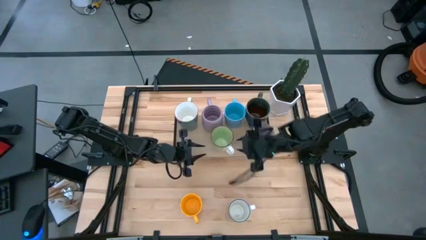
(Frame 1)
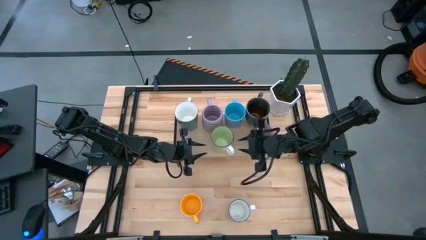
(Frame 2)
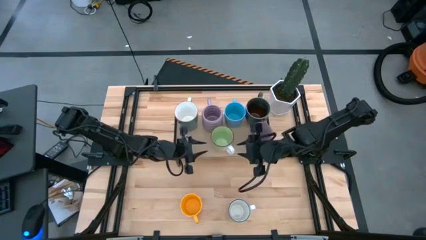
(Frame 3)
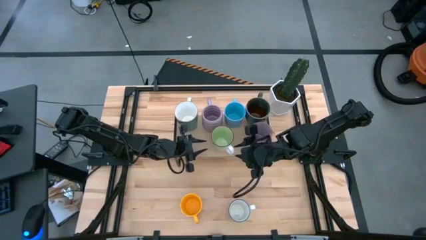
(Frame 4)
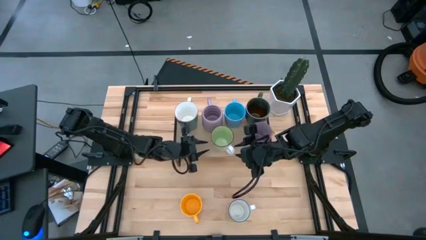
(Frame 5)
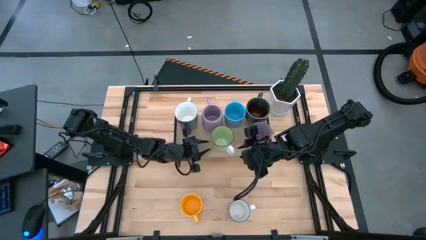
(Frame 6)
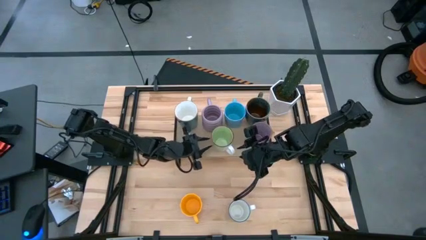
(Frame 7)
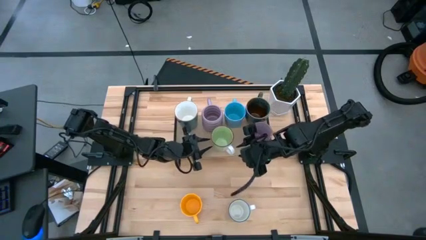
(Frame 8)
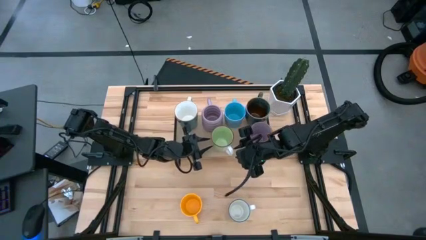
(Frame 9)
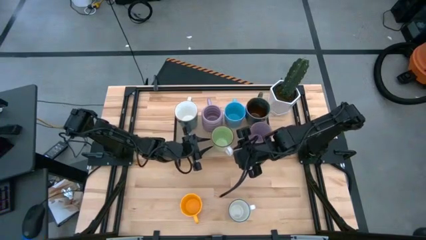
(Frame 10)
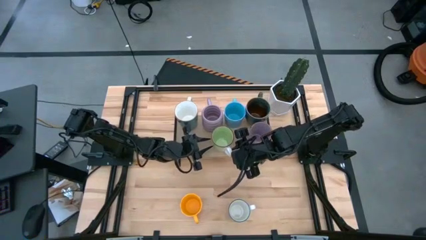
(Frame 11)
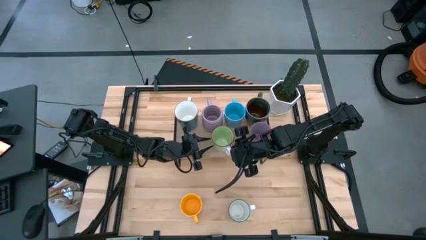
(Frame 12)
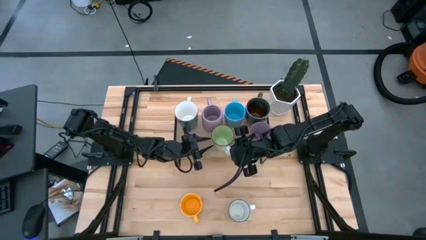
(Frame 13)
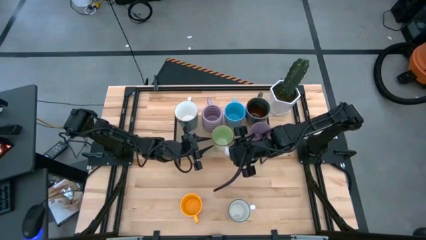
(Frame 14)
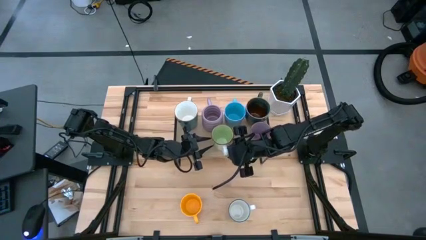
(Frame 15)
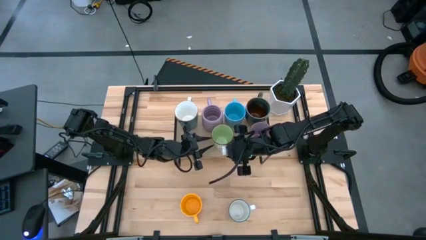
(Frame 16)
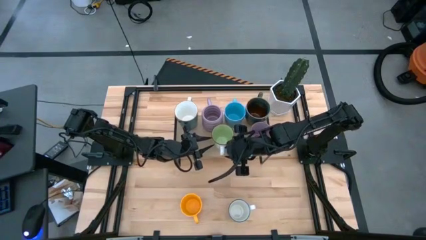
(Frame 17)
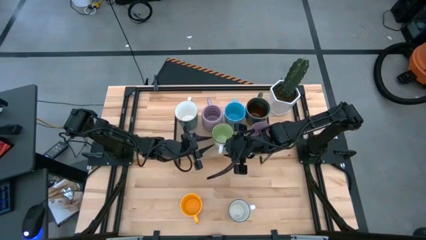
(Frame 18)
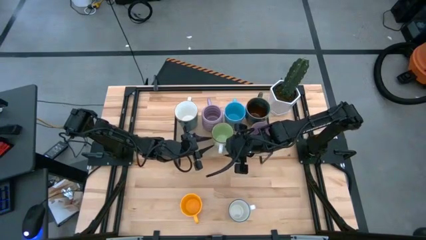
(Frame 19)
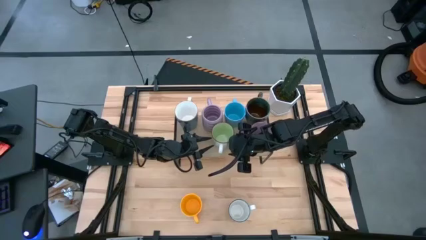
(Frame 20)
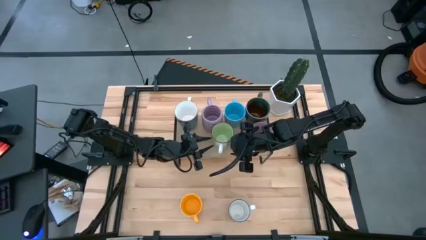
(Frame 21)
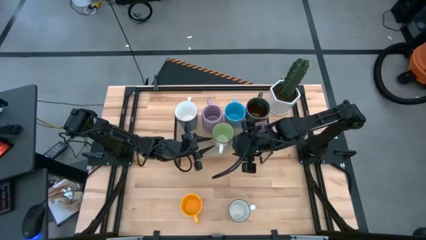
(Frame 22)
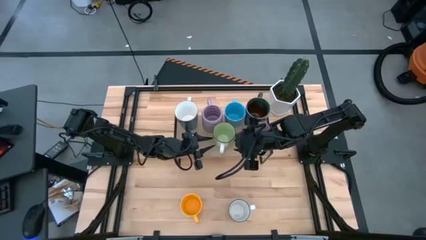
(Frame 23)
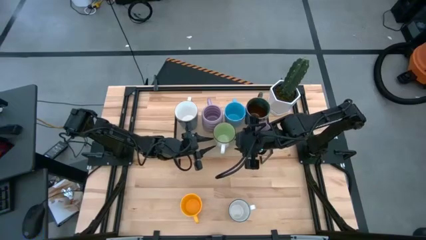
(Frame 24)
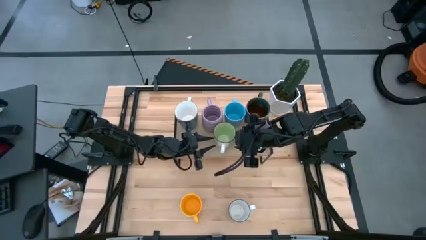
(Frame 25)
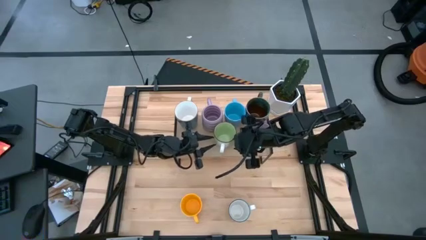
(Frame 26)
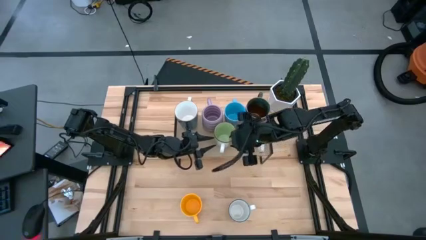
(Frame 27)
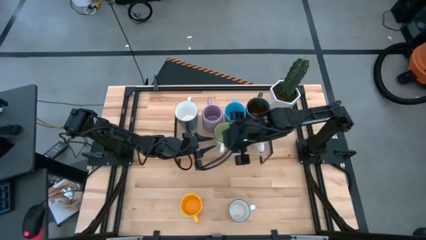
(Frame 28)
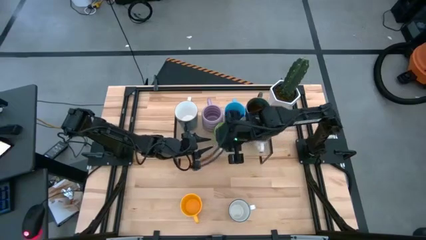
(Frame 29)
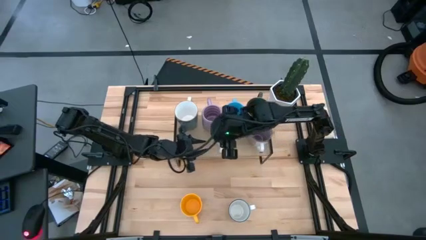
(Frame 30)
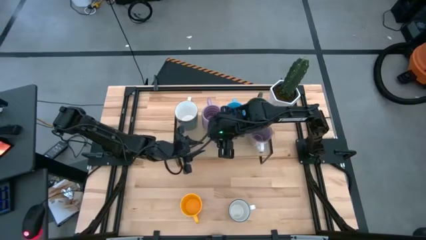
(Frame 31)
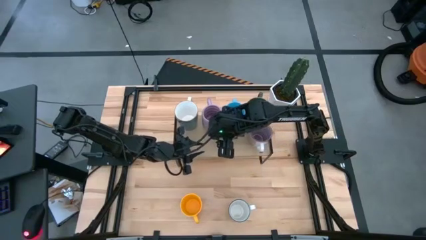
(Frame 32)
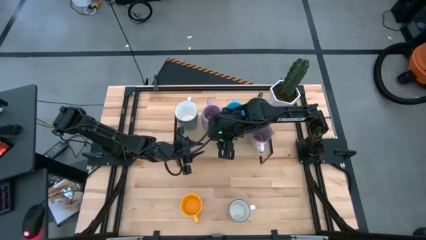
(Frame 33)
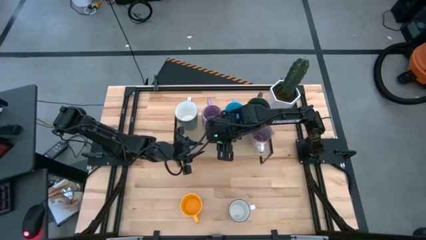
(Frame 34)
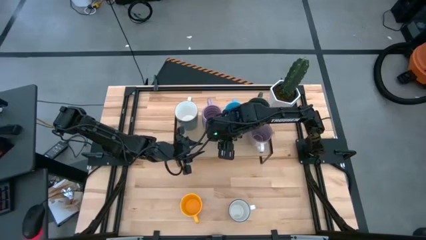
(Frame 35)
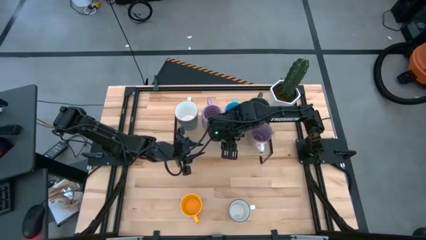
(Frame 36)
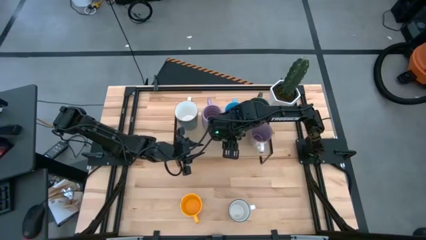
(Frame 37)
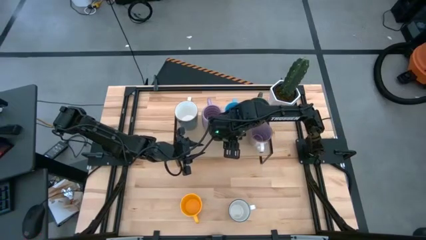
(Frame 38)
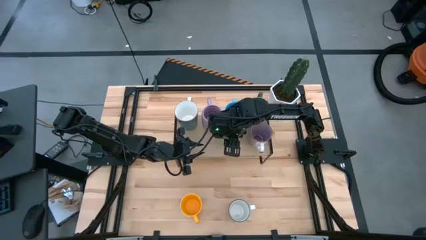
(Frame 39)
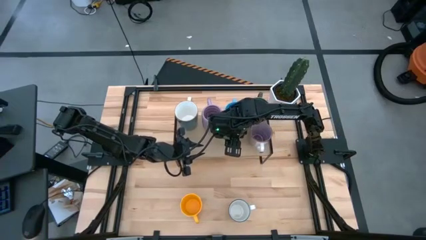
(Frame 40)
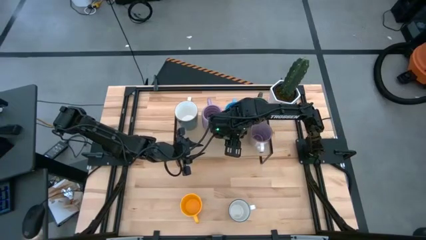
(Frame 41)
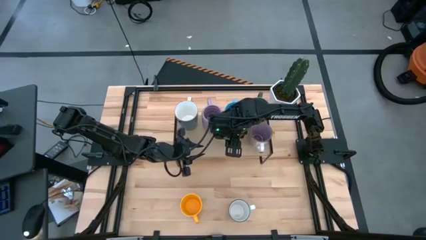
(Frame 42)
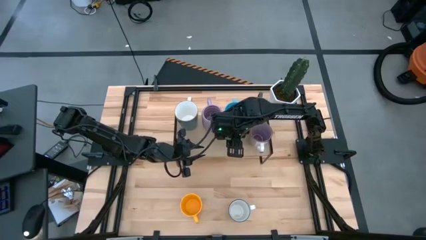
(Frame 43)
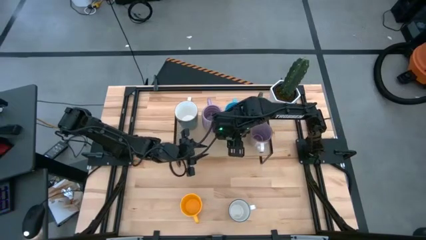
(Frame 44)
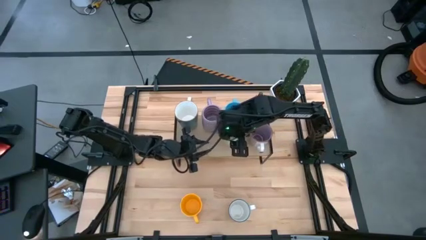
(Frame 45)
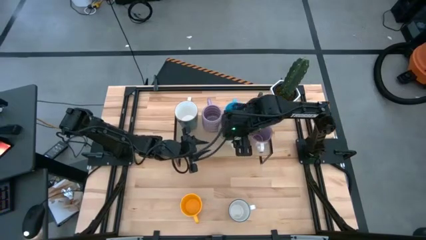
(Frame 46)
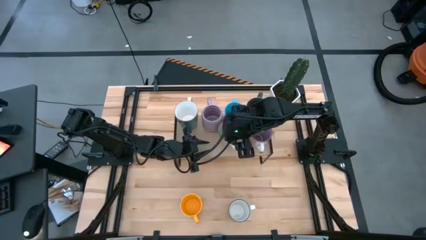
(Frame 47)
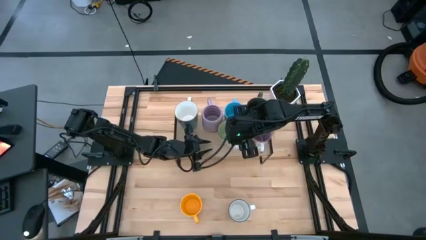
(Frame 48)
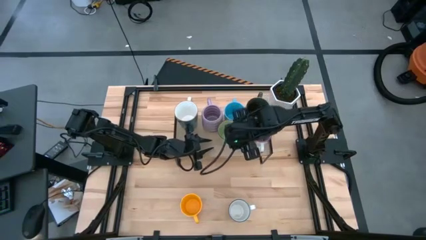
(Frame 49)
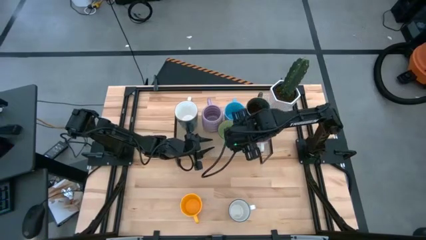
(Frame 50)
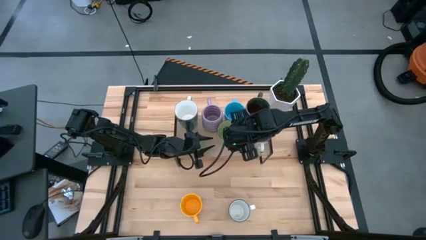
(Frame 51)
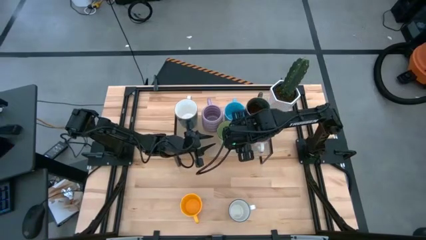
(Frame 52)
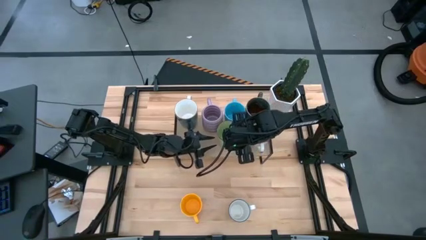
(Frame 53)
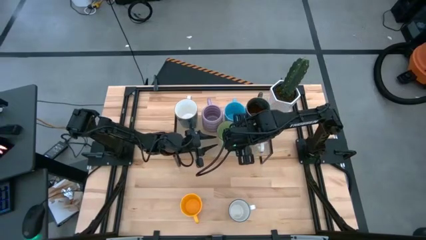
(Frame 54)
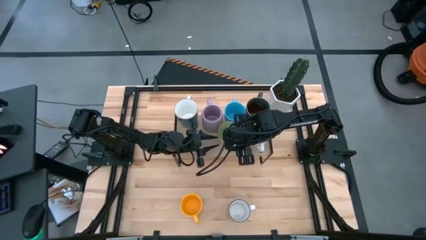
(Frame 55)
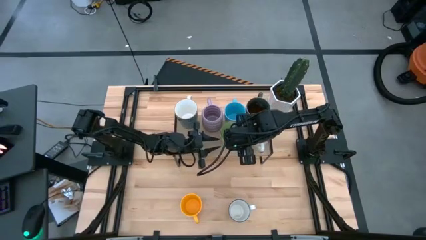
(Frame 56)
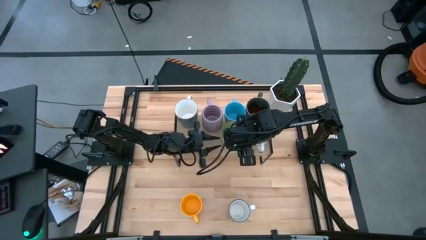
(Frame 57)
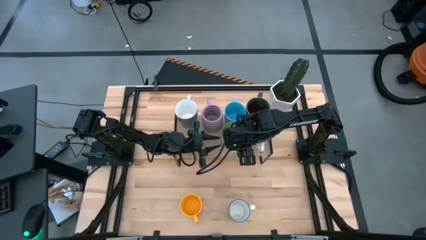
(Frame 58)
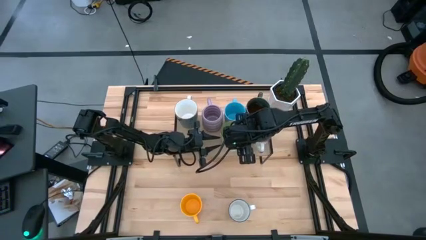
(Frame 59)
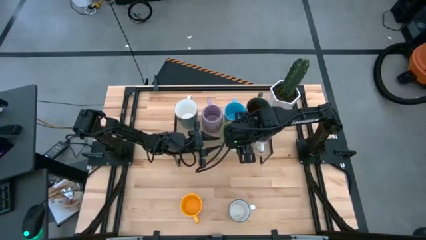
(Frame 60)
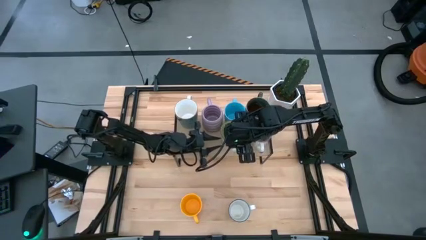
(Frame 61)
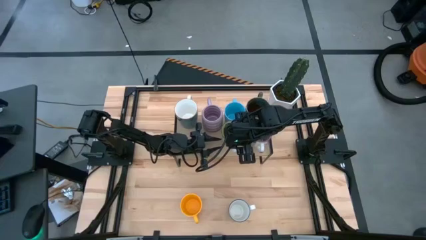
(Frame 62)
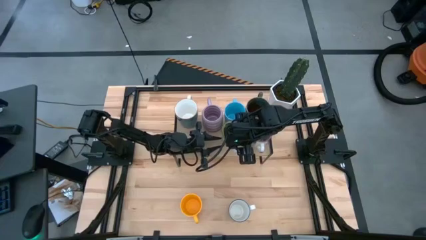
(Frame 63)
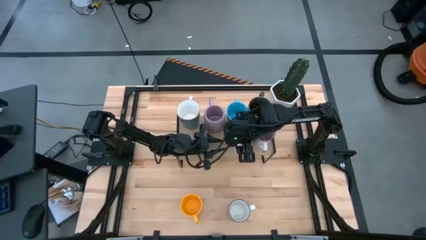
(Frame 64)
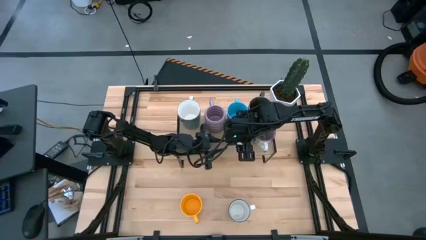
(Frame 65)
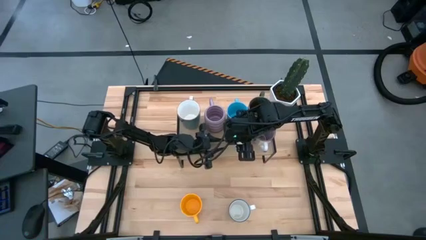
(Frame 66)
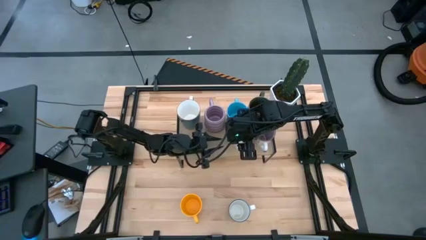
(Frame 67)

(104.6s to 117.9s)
Task: Place coffee mugs
Adjust the green mug on the shelf
